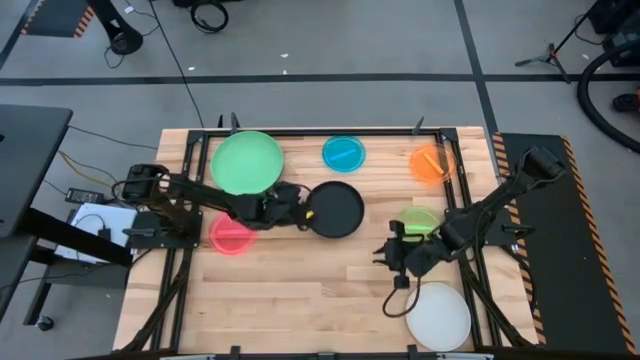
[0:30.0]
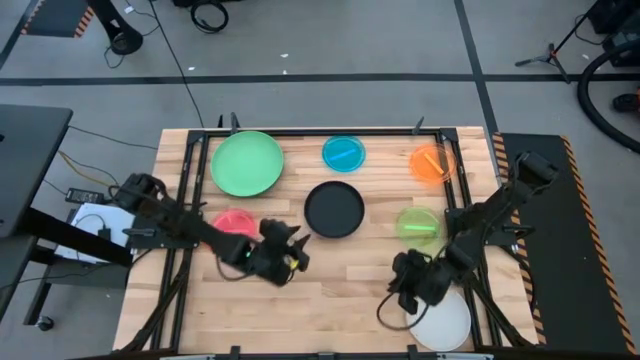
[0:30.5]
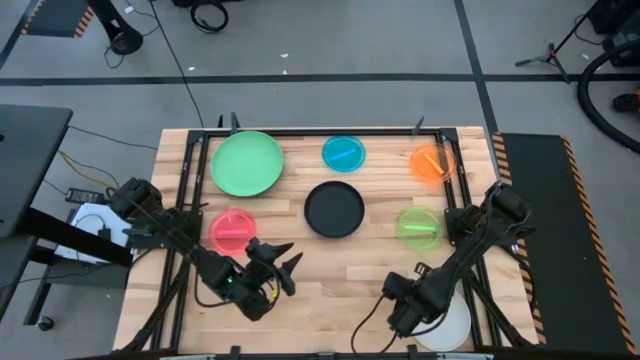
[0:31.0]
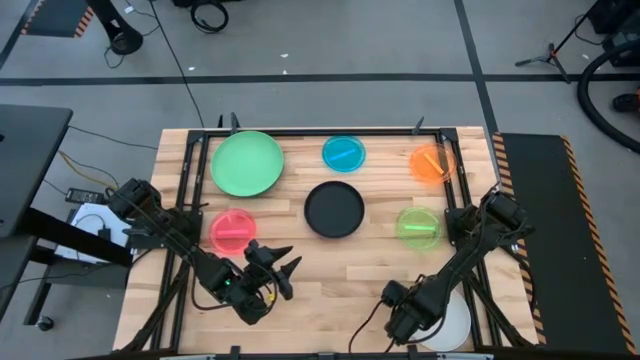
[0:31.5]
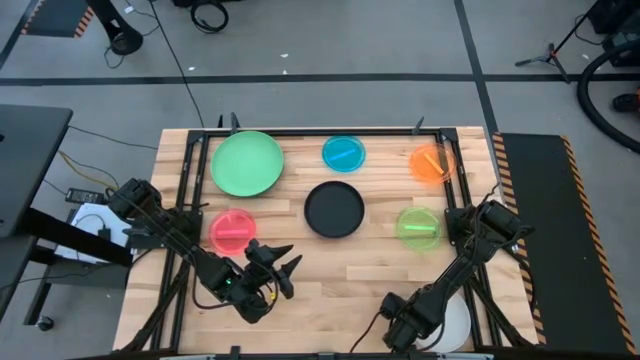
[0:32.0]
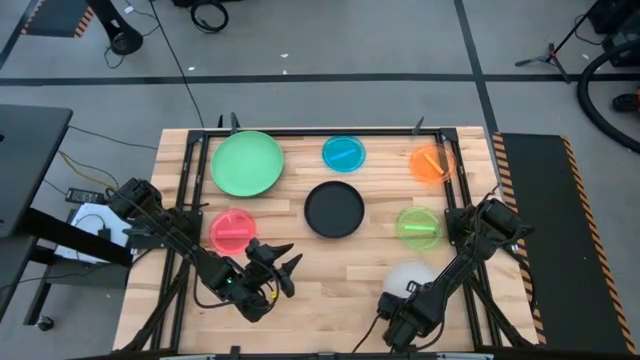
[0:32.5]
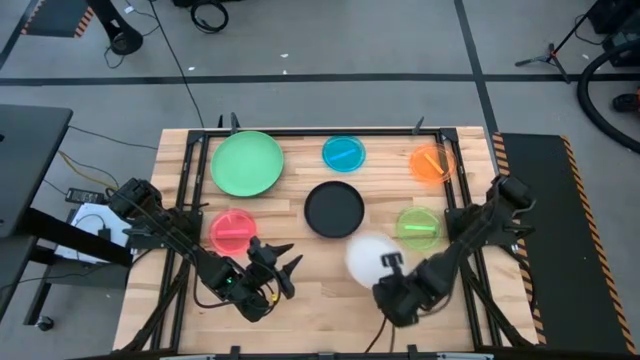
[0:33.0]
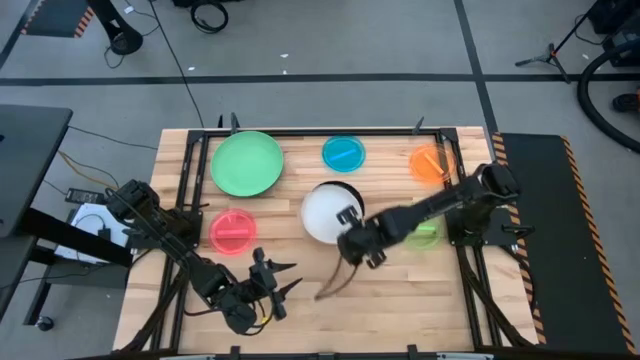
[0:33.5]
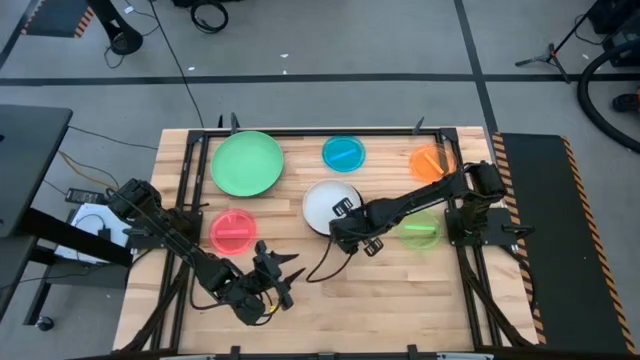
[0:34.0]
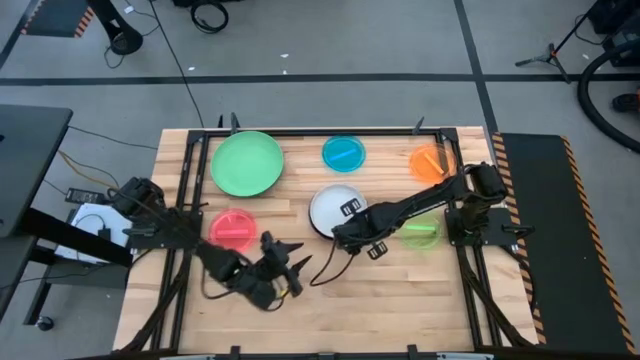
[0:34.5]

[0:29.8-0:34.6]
Task: Stack plastic plates
Stack the white plate on top of the black plate

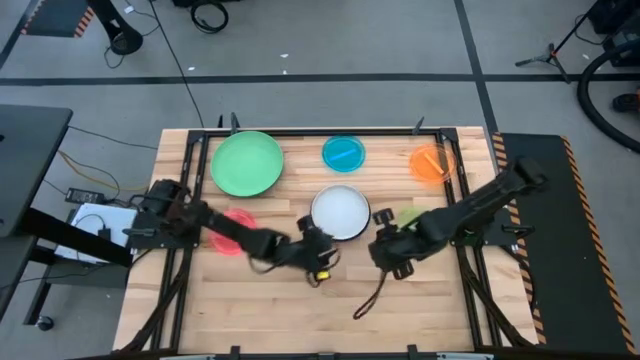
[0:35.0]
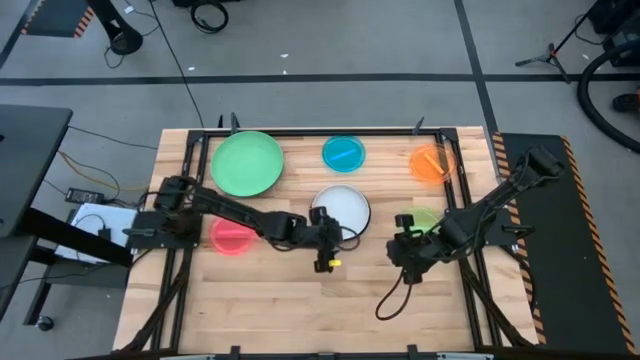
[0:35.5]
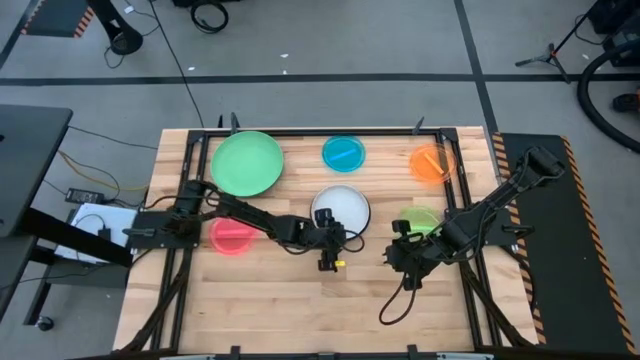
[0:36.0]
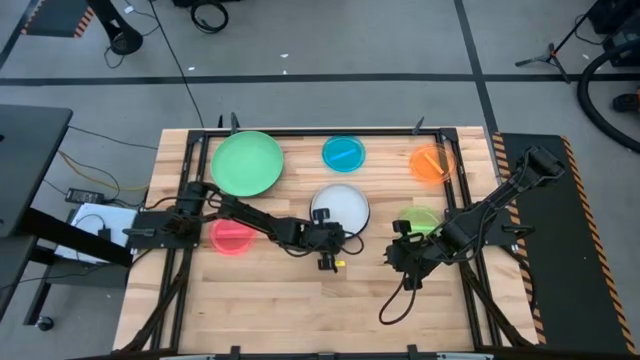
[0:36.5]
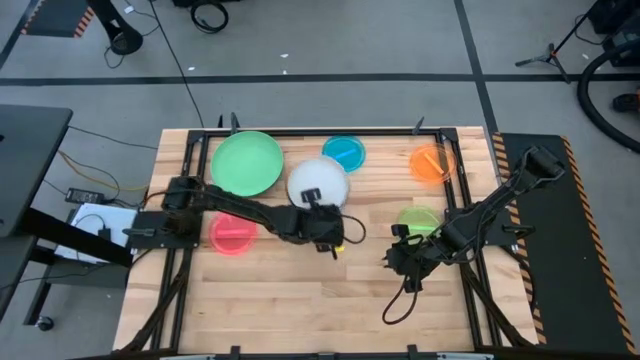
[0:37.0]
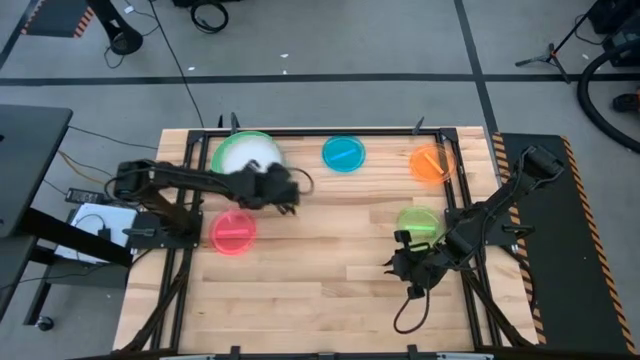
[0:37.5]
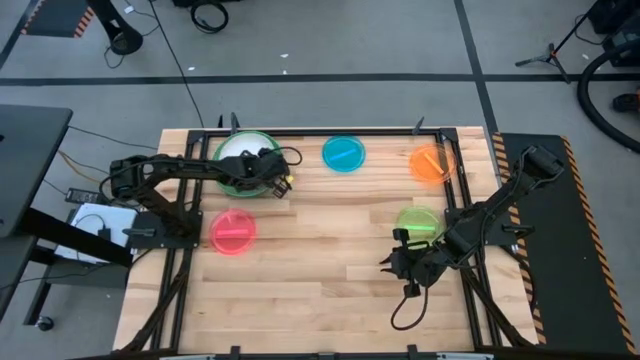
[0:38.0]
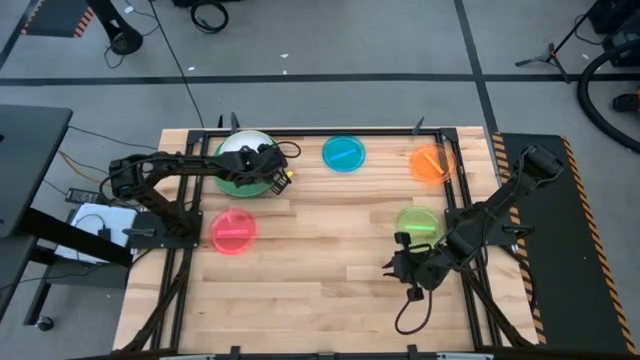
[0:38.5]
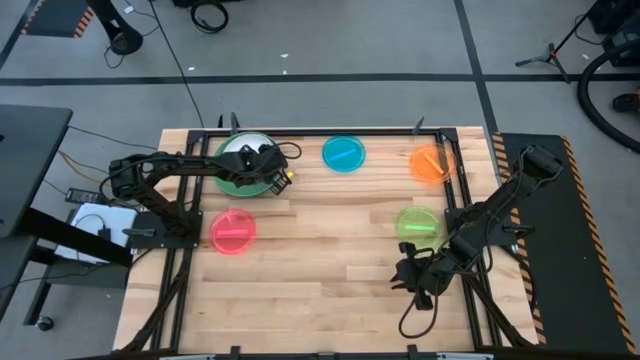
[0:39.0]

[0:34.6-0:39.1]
Stack the stacked plates on top of the green plate

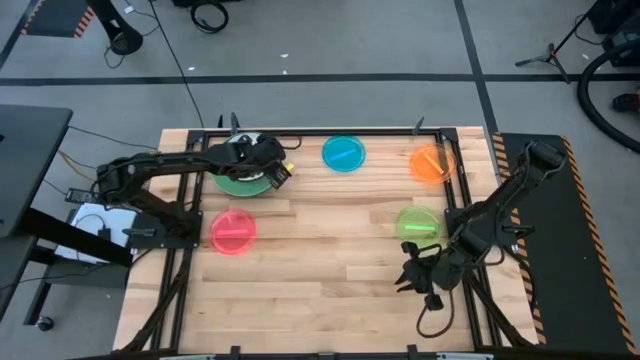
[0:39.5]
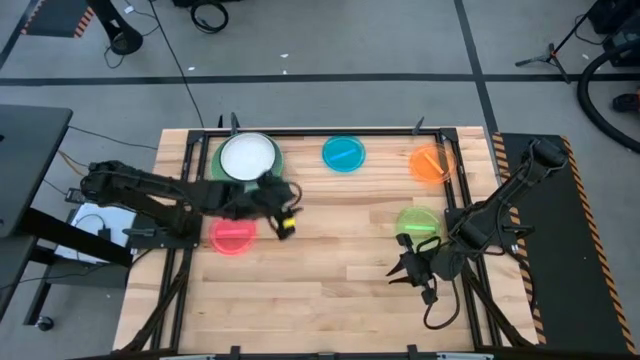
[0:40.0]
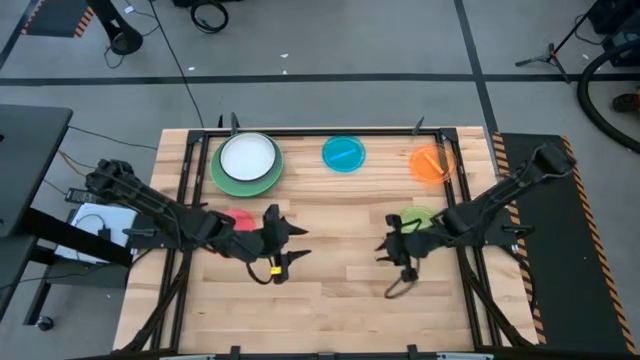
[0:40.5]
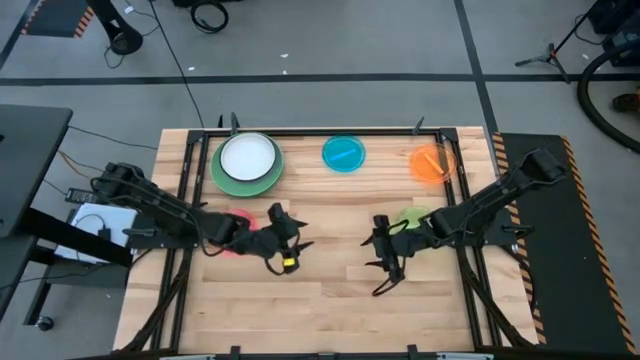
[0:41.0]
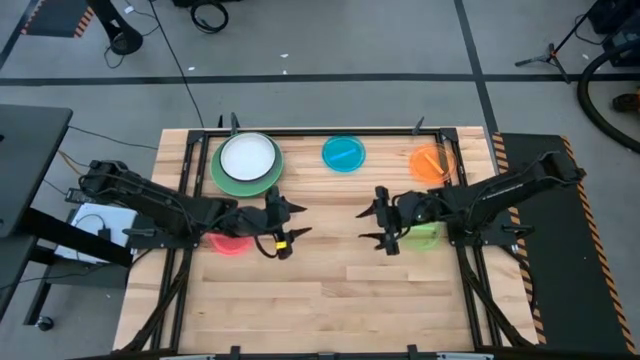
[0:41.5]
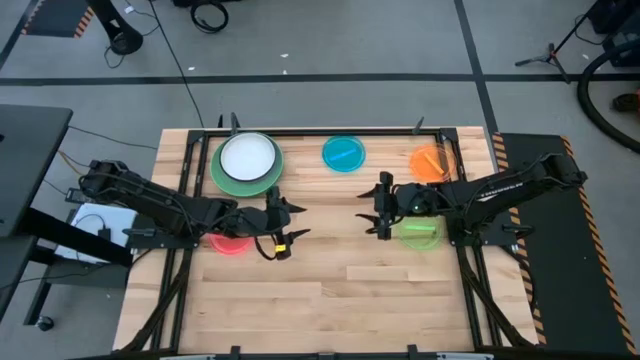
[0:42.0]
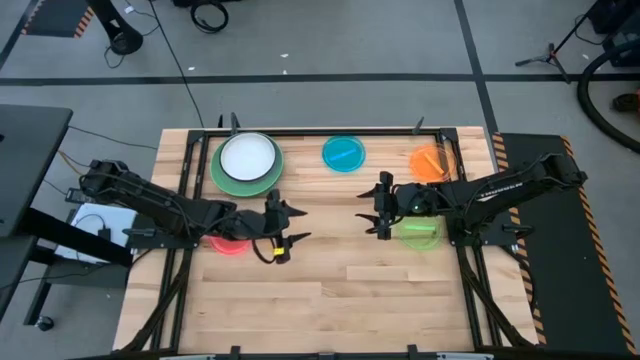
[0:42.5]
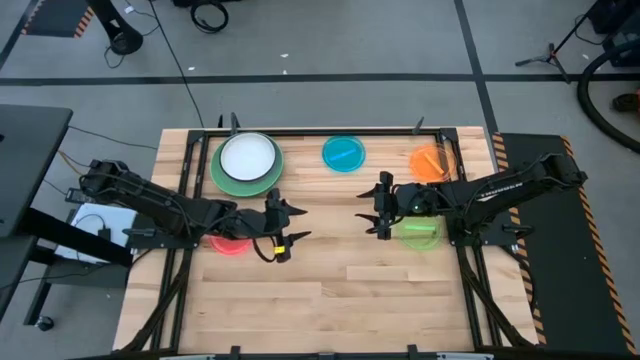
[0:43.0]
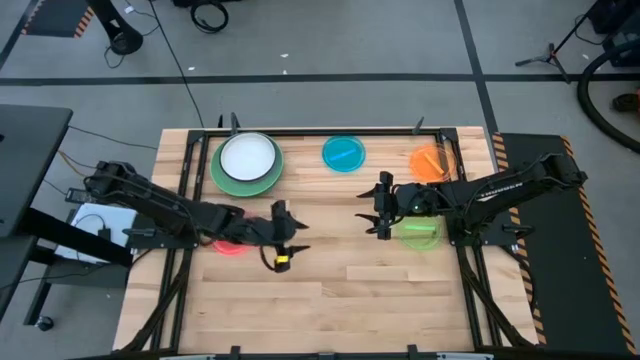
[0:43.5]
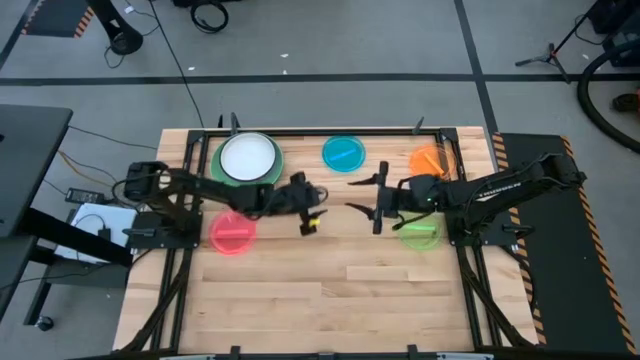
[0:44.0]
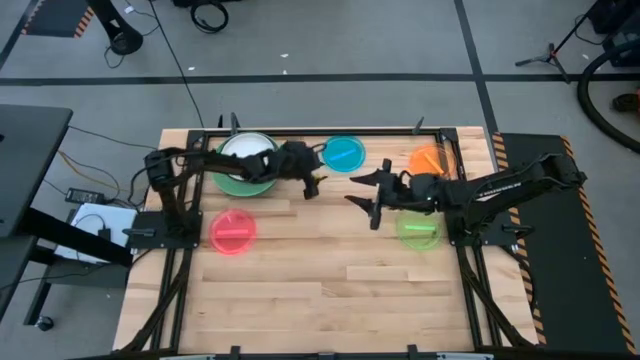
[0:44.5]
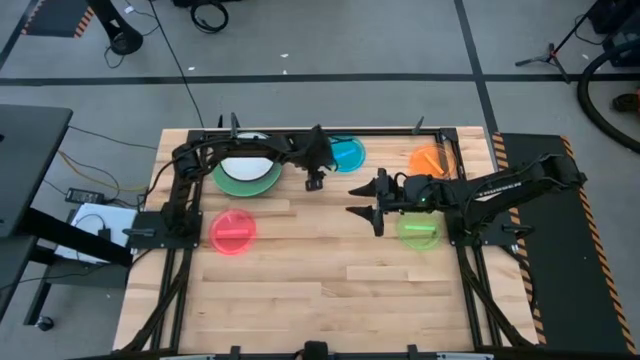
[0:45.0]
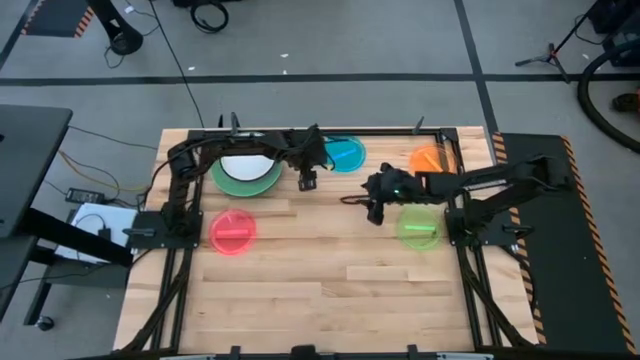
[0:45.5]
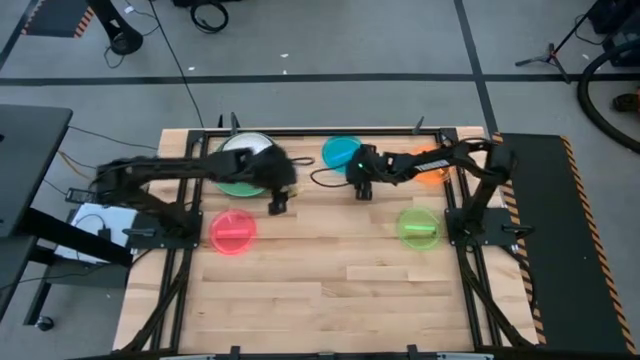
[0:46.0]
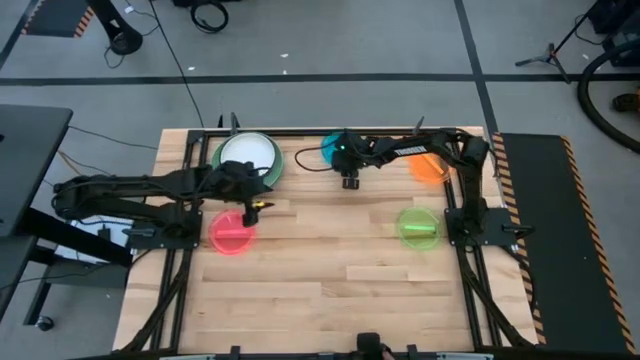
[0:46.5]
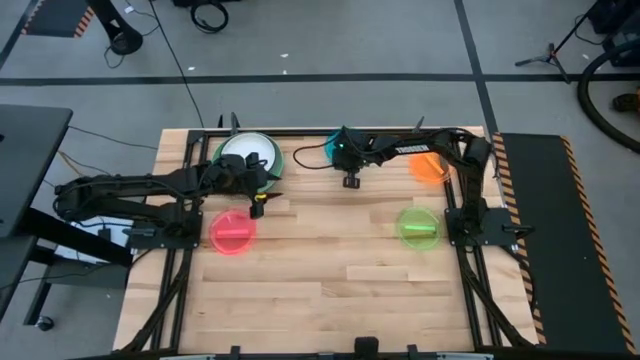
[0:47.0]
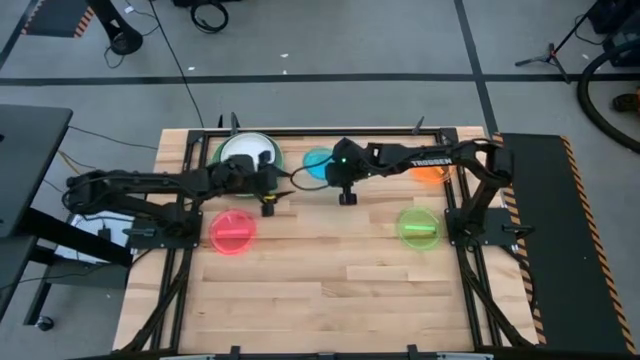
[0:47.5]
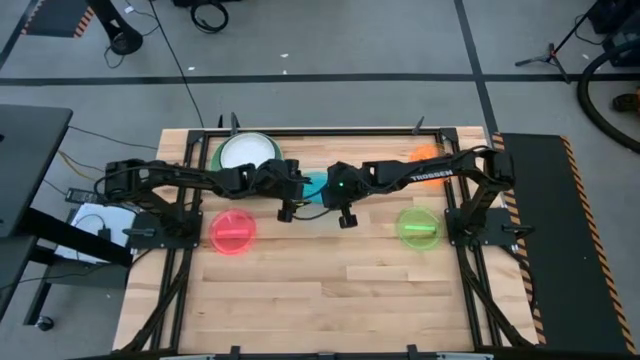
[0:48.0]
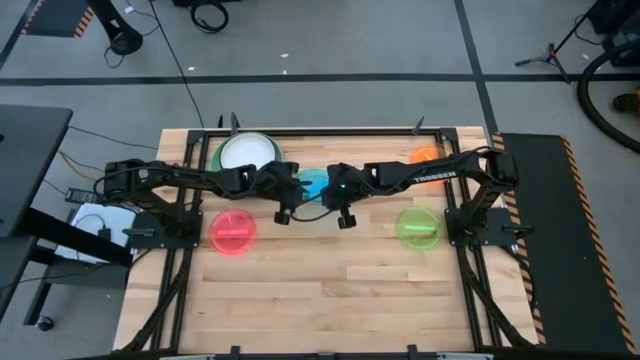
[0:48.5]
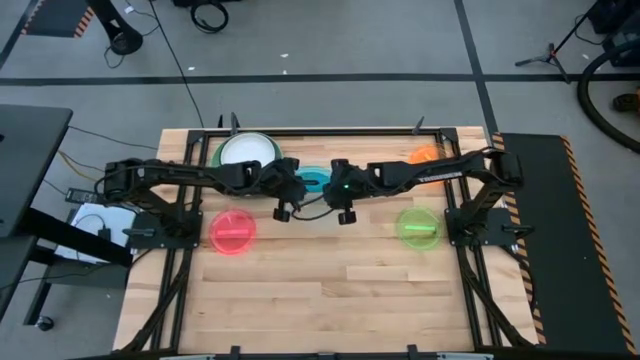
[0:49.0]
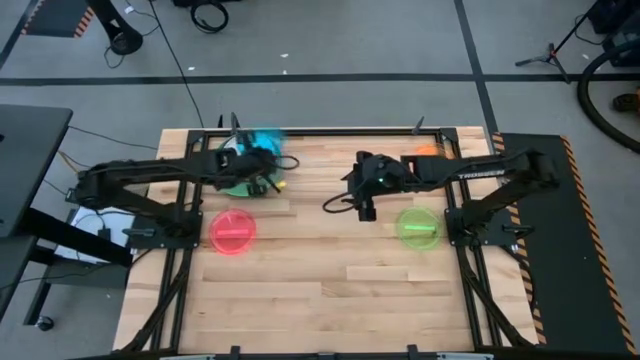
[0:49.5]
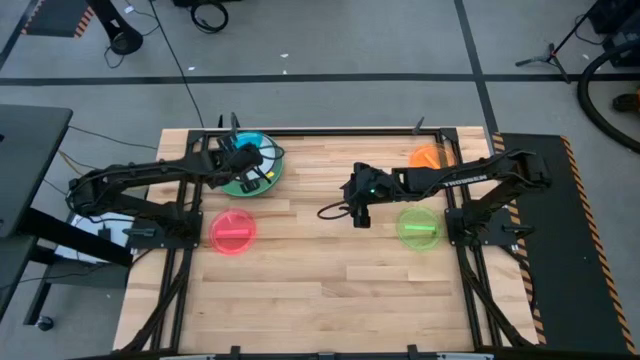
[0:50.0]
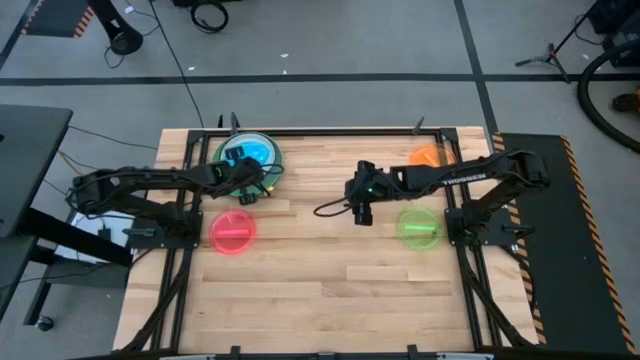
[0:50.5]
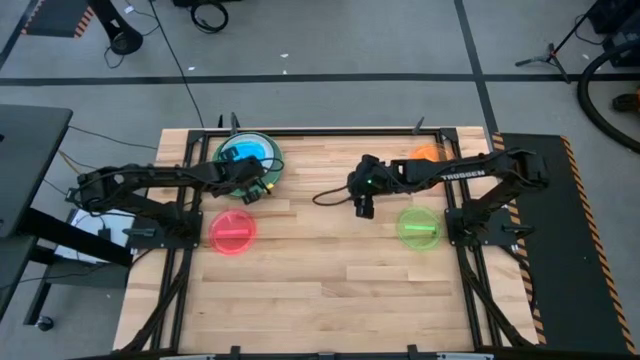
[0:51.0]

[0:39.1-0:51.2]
Stack the blue plate on top of the white plate
